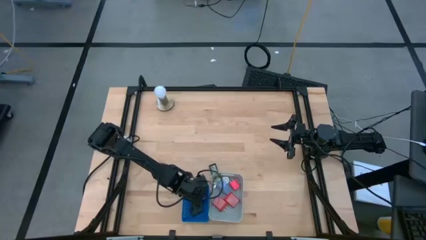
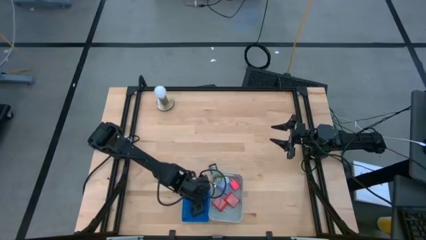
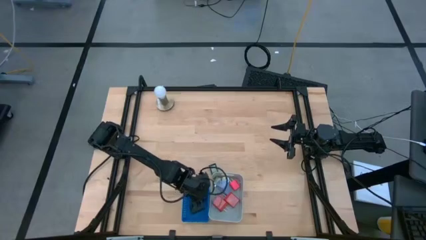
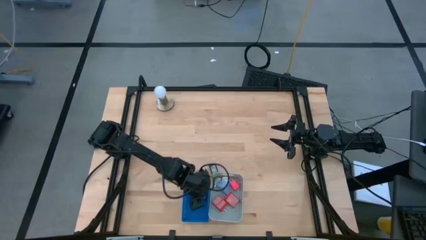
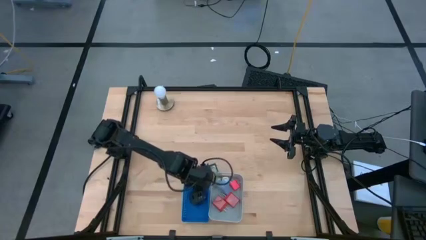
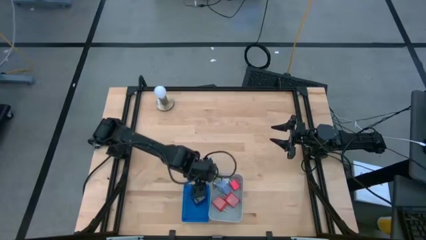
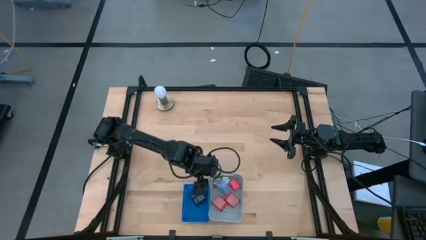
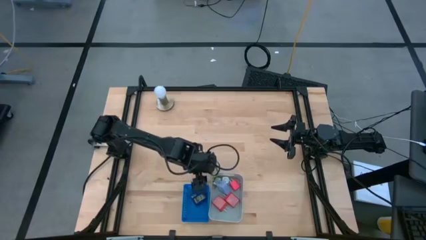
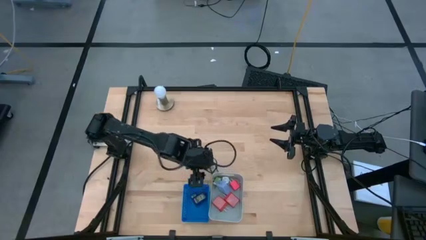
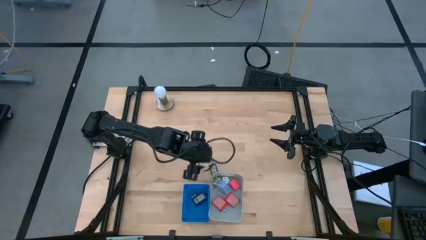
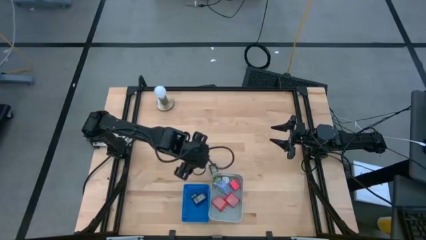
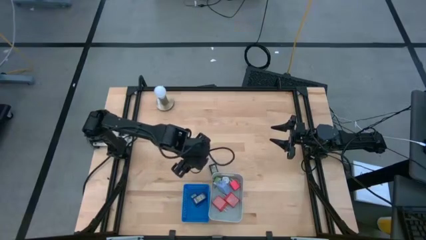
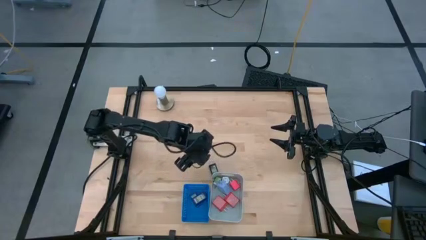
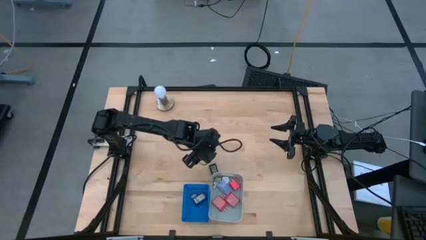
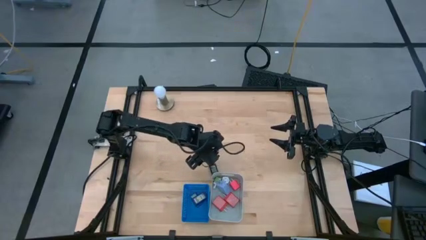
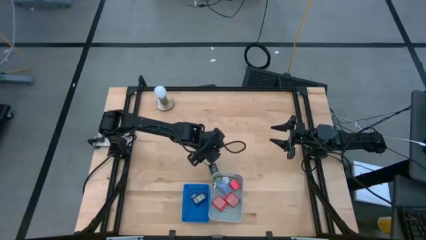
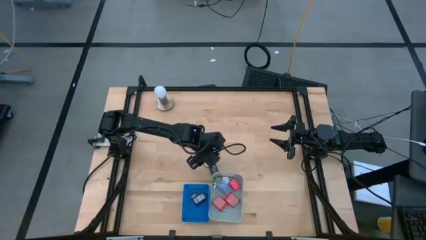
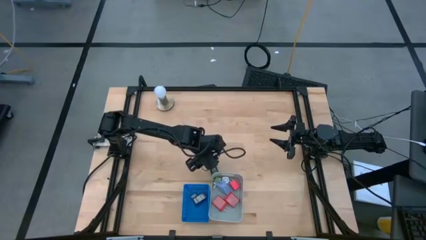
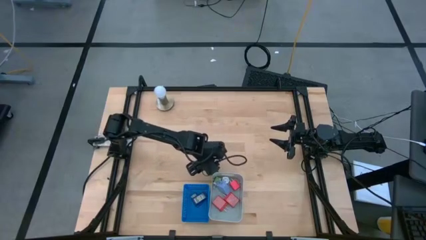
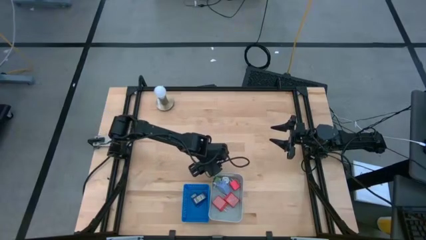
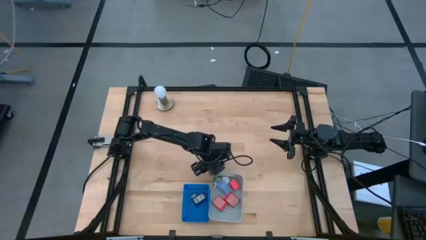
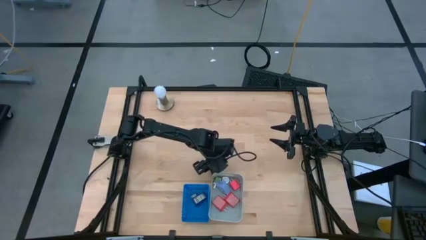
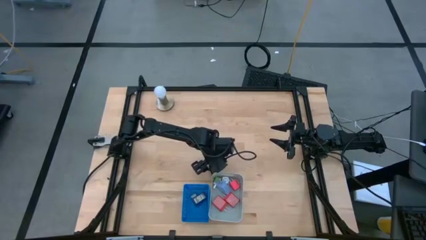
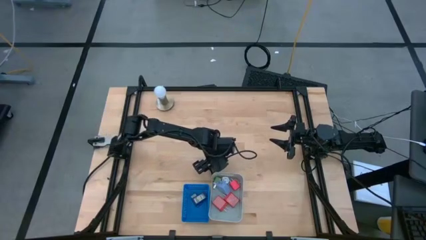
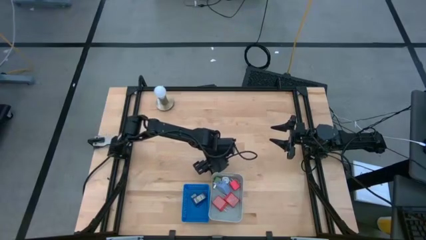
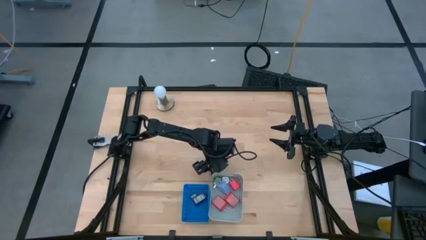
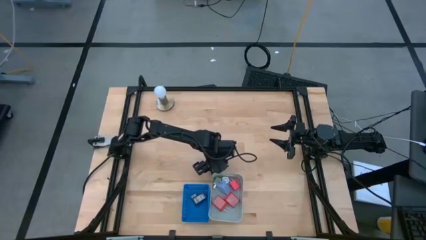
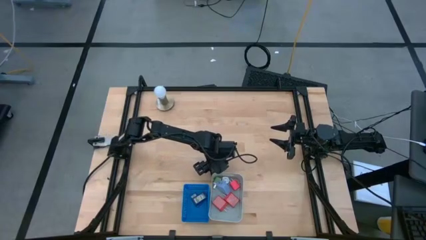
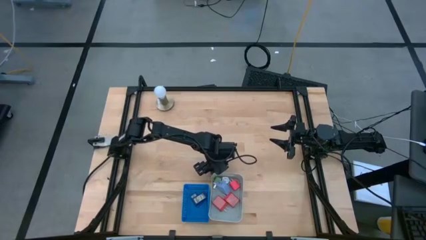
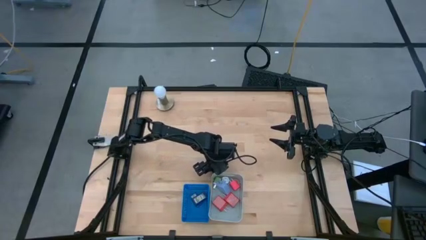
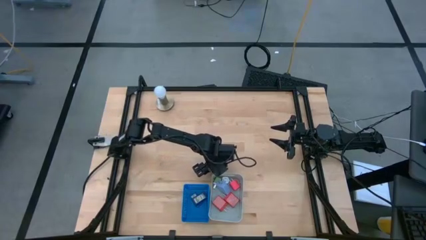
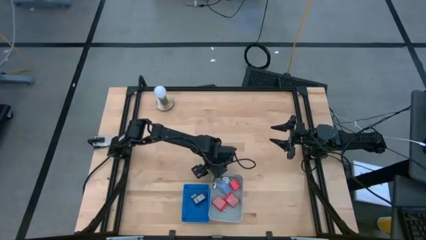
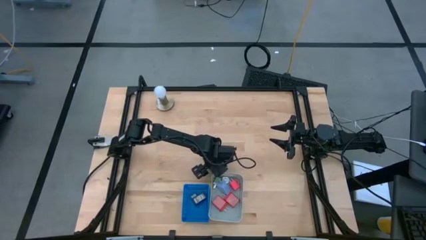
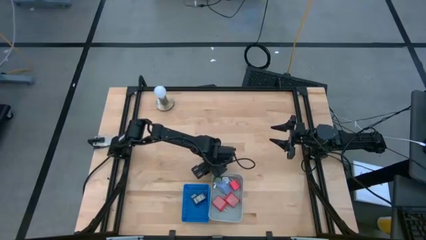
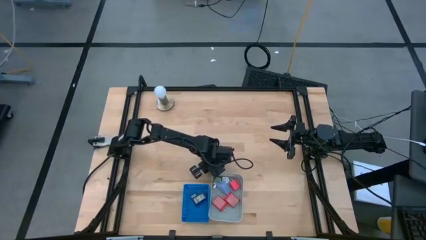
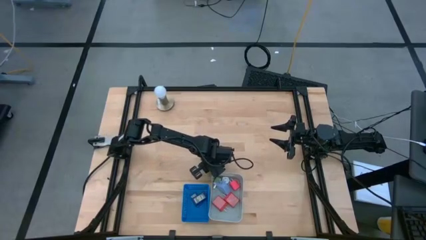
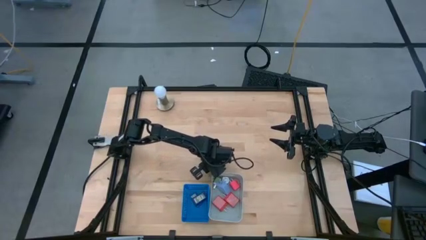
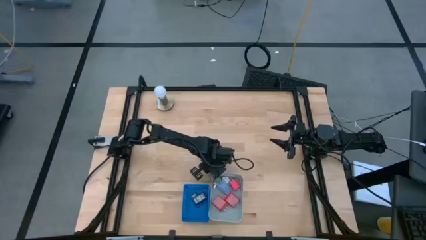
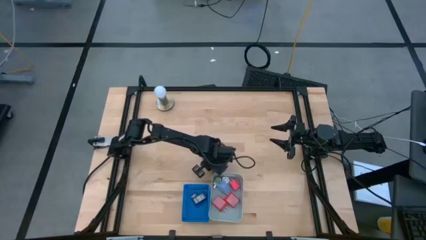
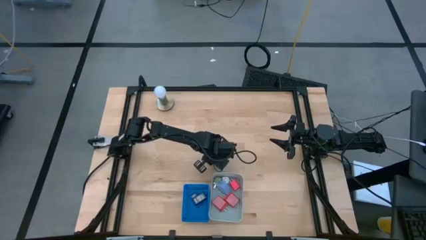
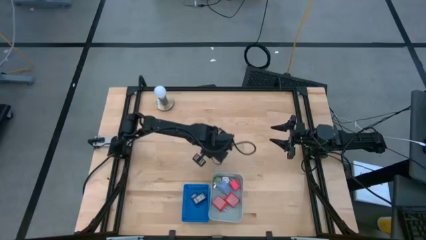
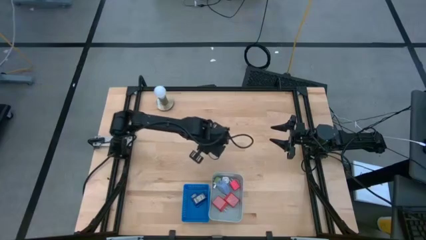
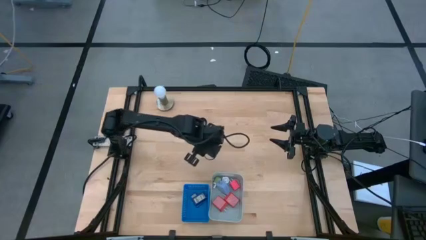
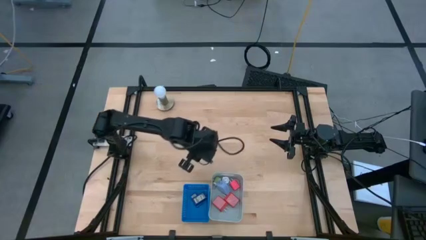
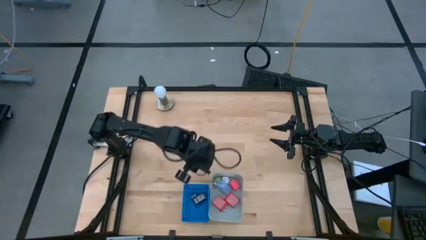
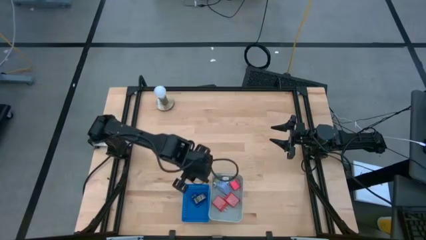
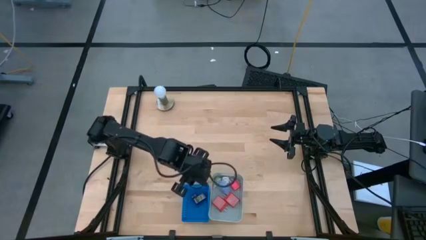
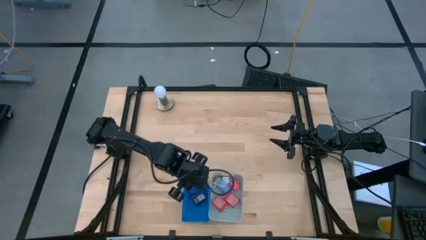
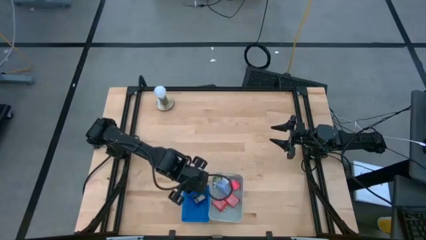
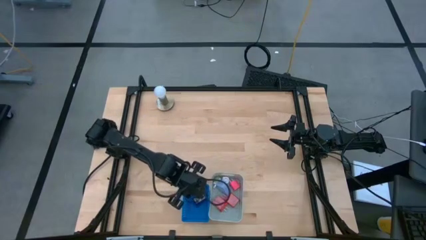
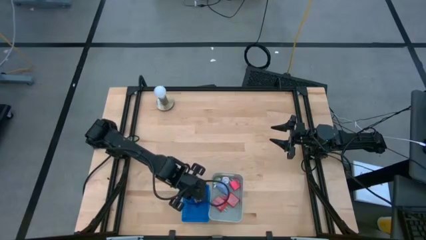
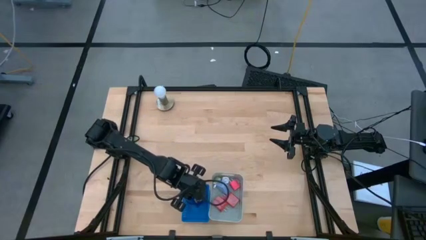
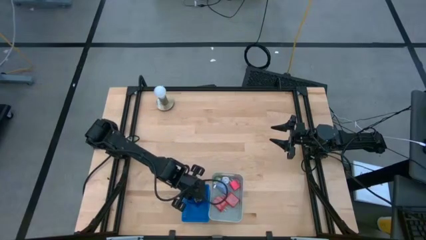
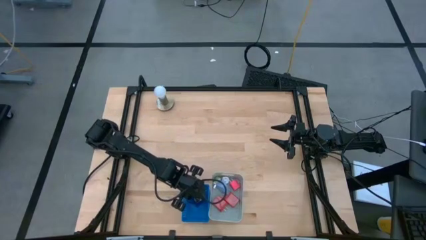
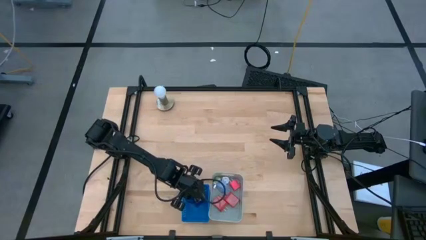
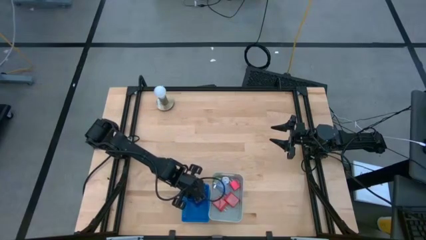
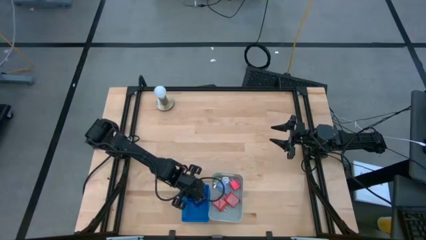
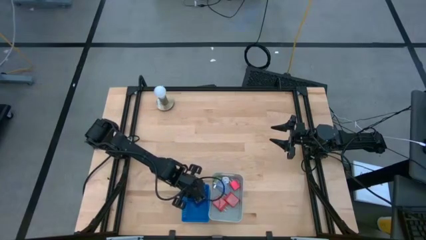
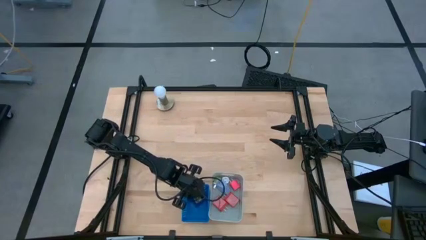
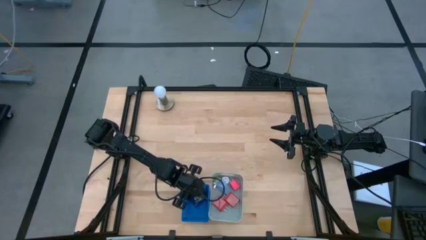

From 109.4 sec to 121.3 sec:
Task: Pick & Place Office items
Put the black digital clock into the blue bin

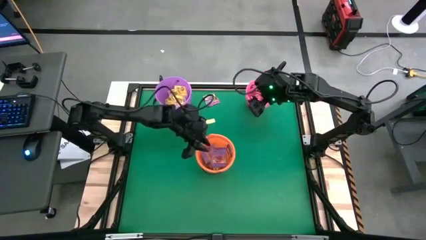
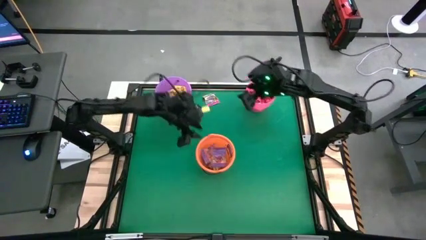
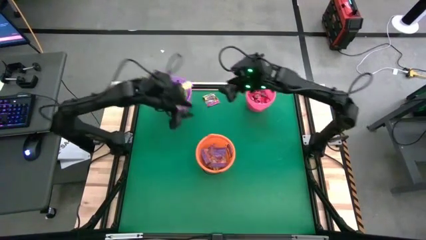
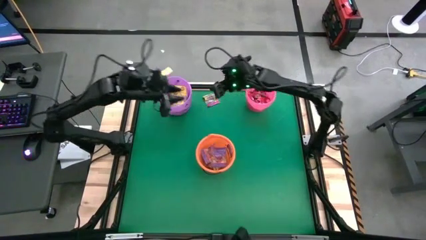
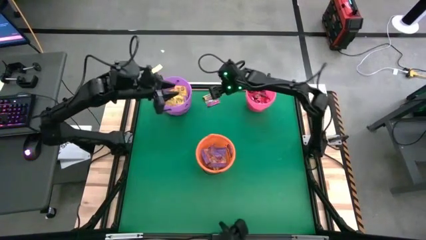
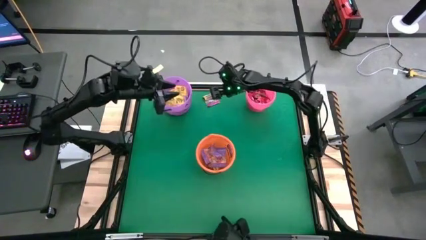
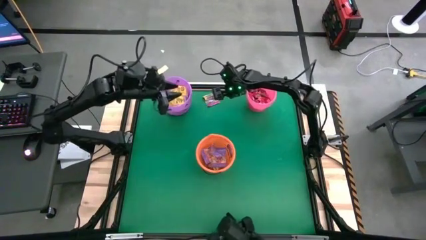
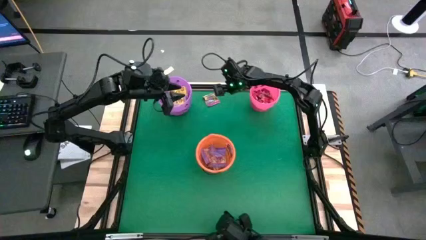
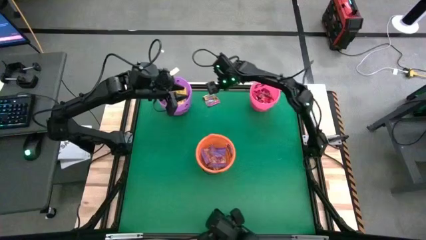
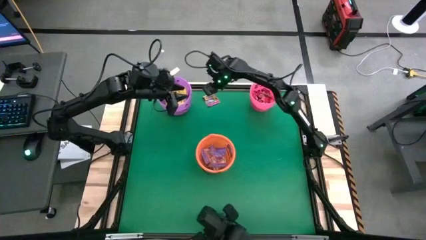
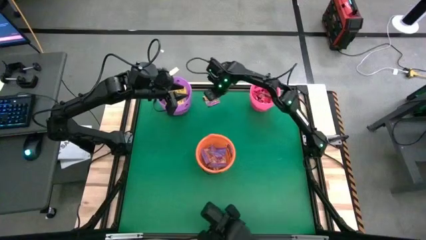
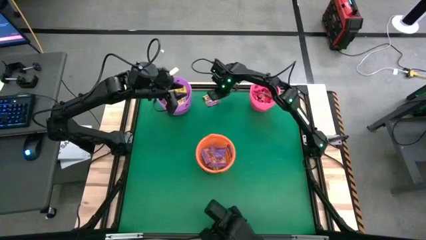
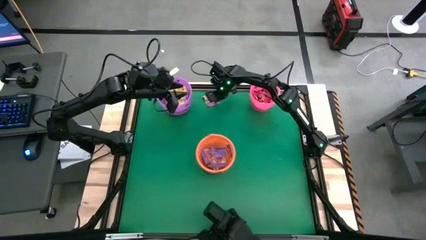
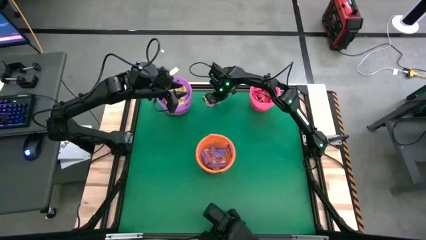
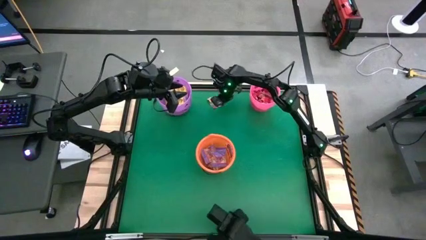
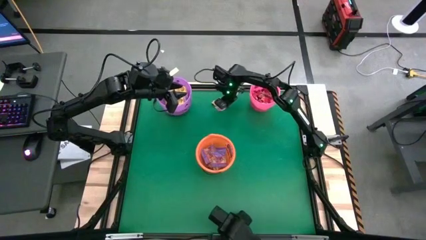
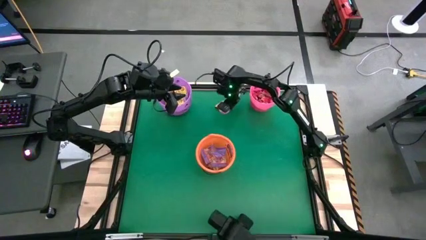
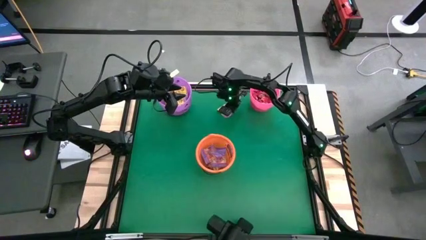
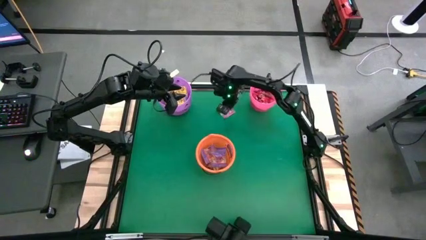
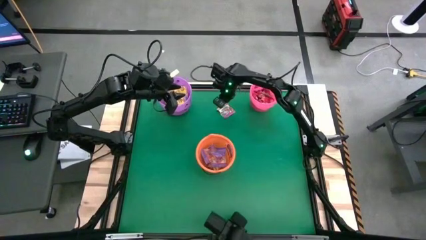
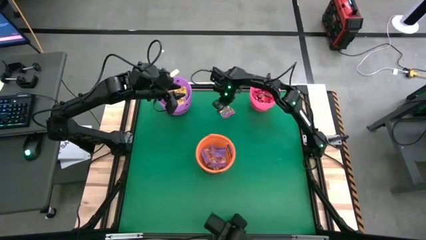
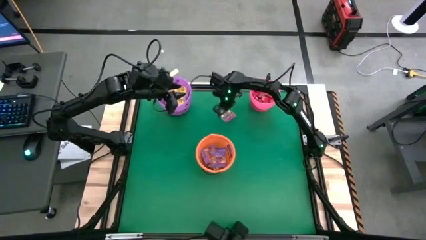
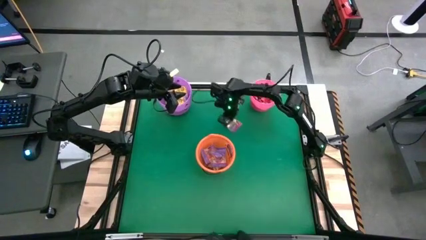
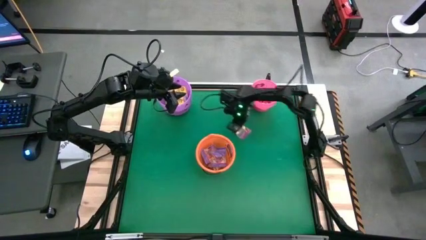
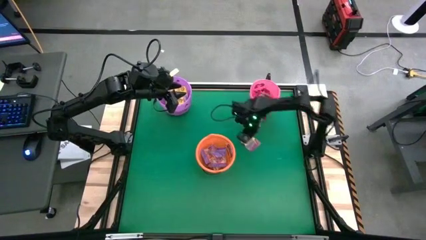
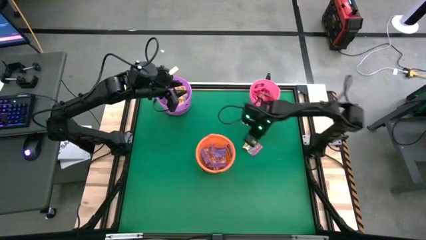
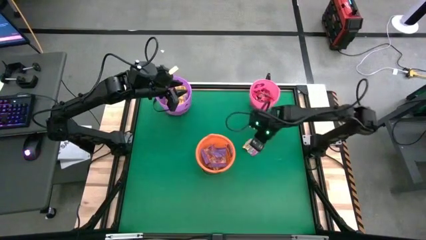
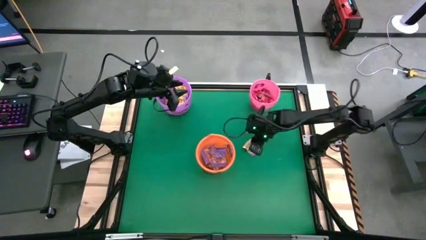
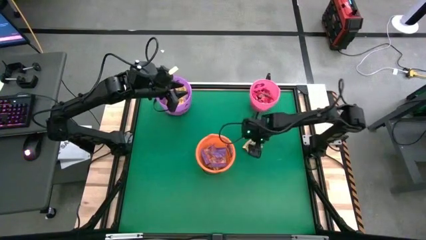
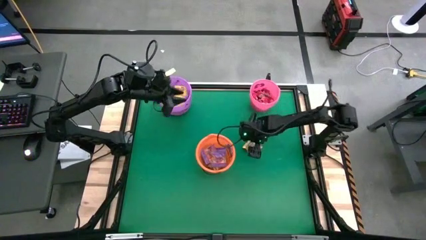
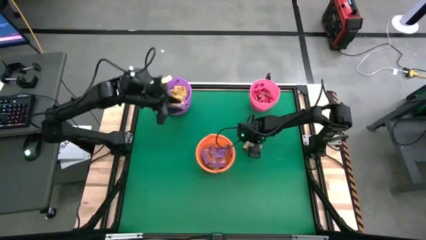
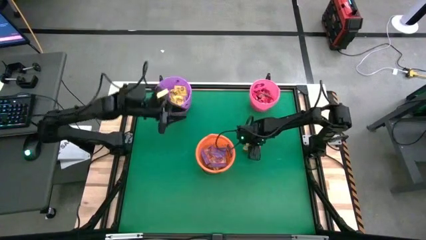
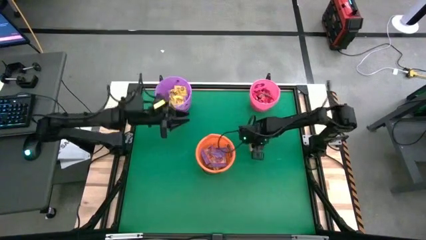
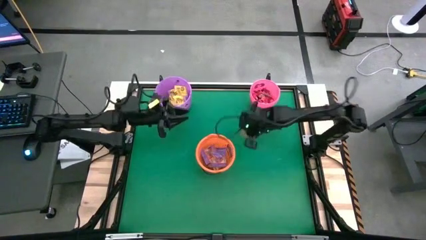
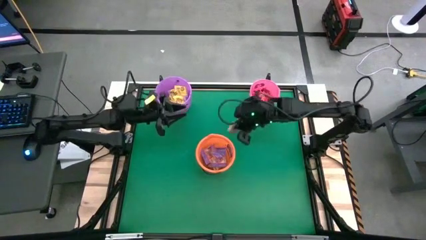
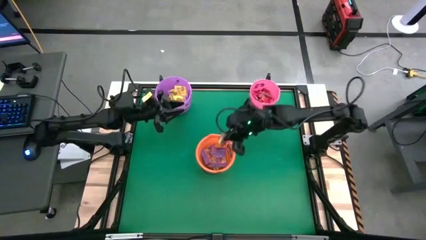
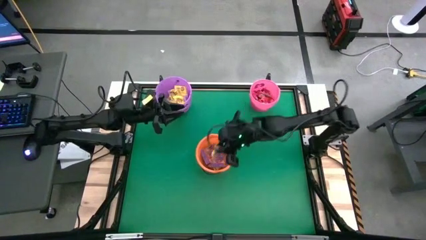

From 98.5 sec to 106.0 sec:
Task: Sort candy by brand, put in halloween buckets
Put the dark yellow candy into the orange bucket
